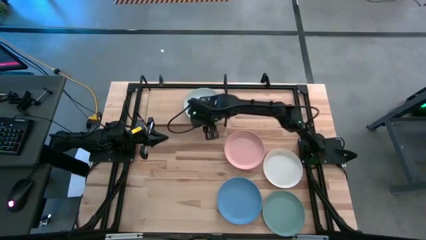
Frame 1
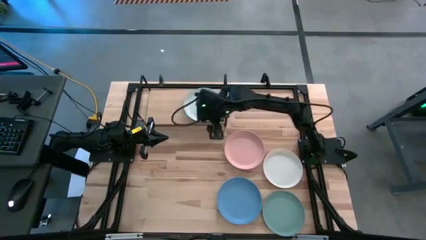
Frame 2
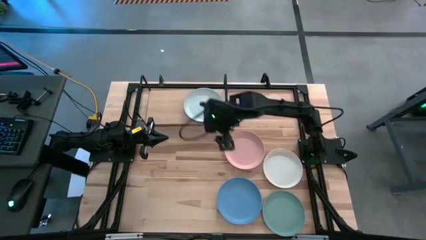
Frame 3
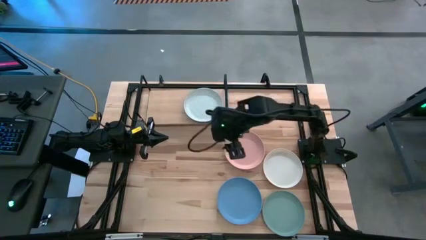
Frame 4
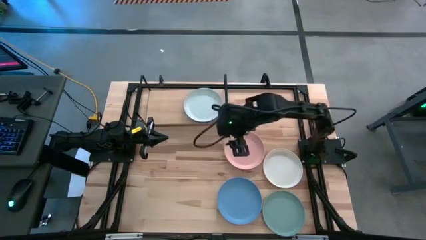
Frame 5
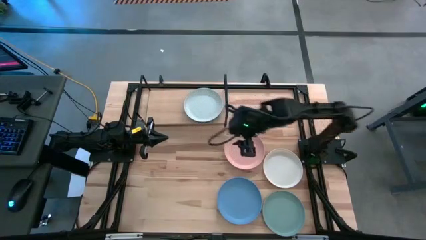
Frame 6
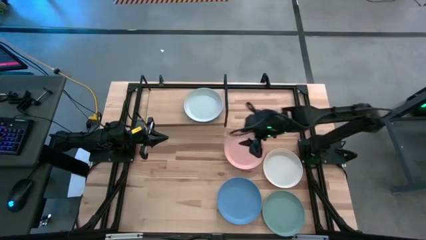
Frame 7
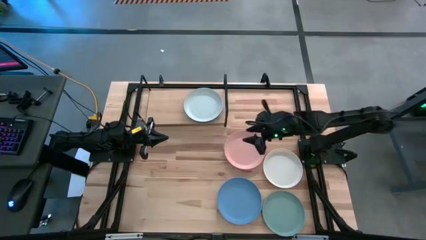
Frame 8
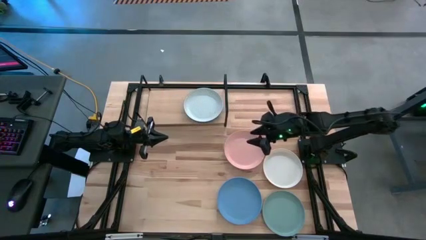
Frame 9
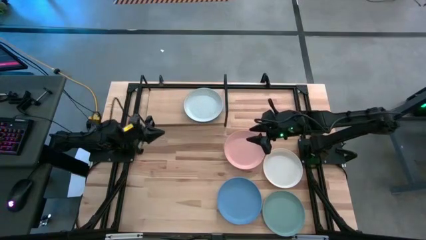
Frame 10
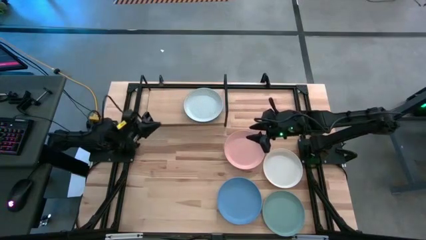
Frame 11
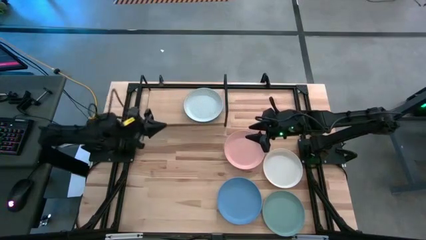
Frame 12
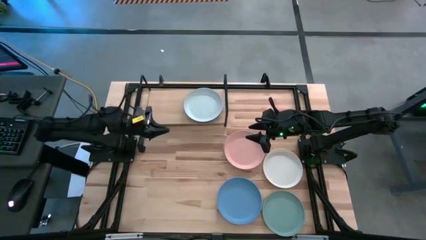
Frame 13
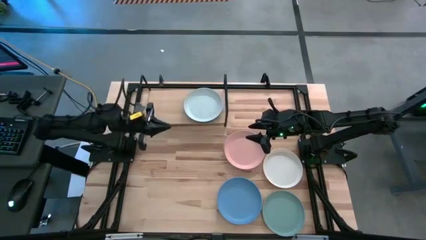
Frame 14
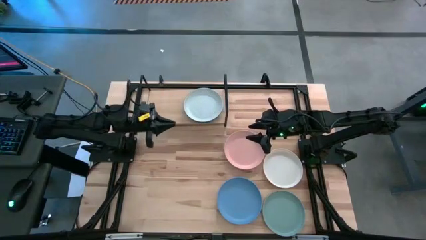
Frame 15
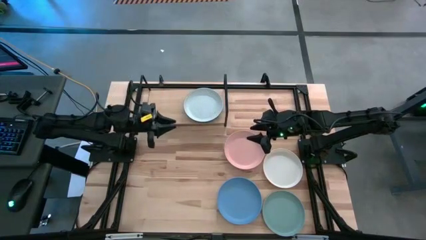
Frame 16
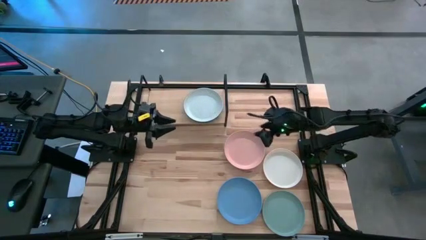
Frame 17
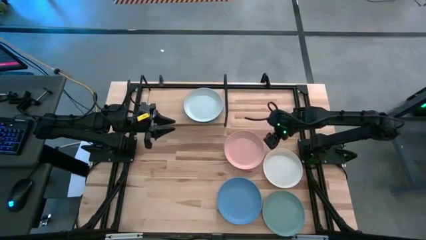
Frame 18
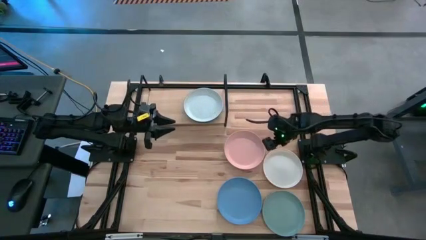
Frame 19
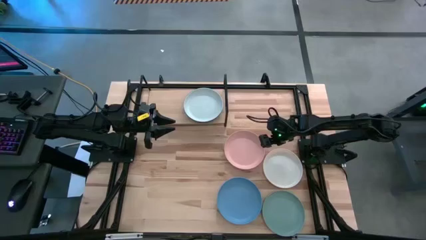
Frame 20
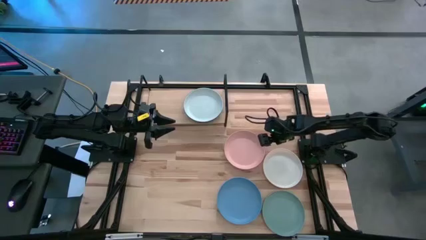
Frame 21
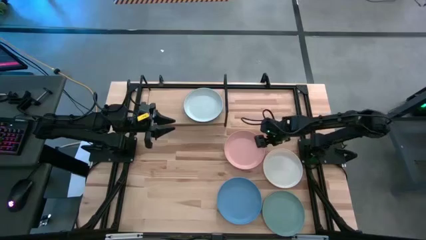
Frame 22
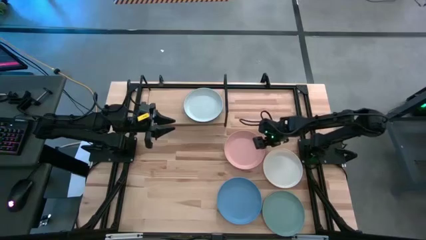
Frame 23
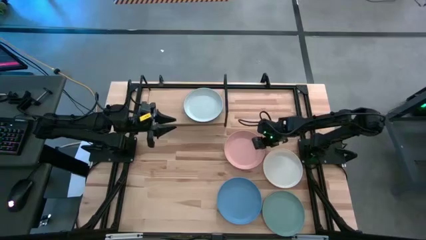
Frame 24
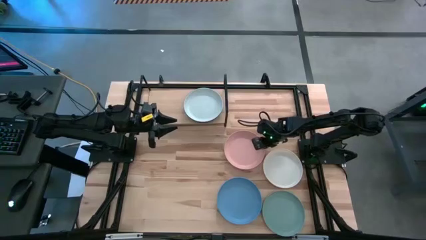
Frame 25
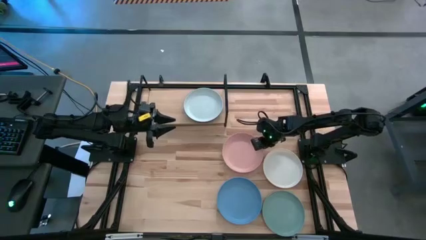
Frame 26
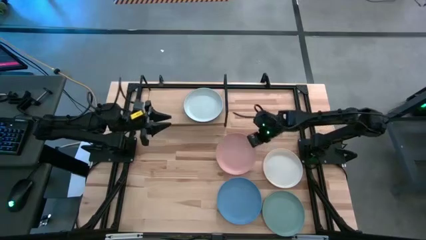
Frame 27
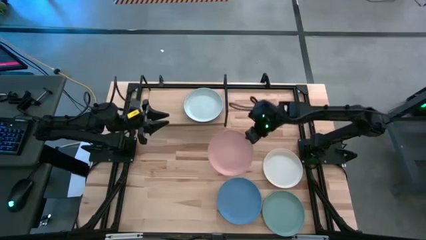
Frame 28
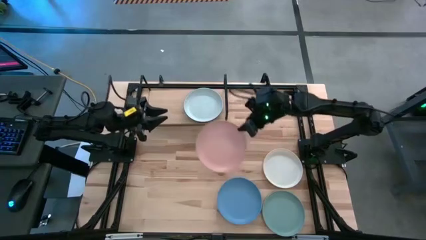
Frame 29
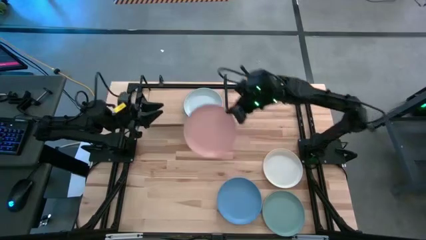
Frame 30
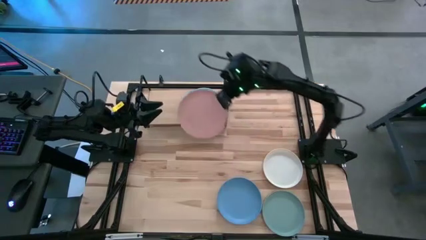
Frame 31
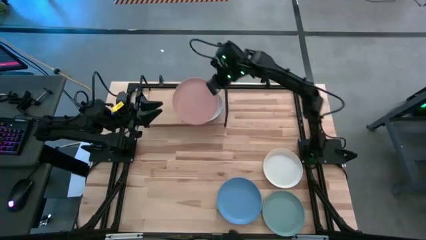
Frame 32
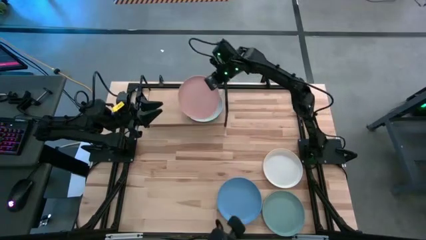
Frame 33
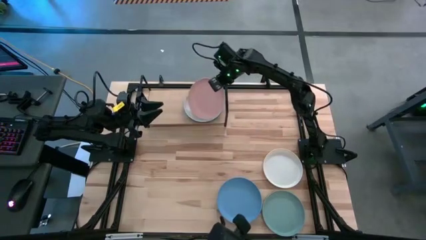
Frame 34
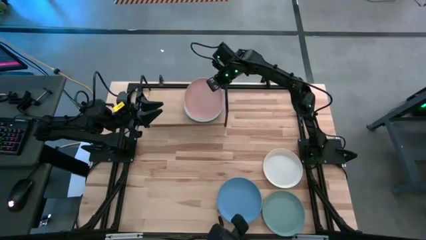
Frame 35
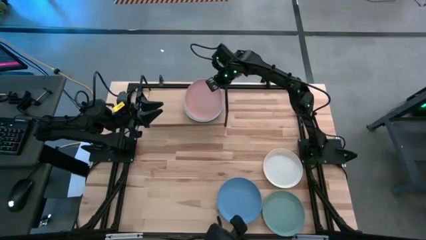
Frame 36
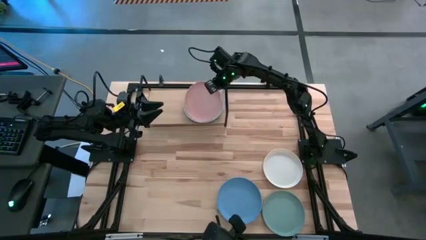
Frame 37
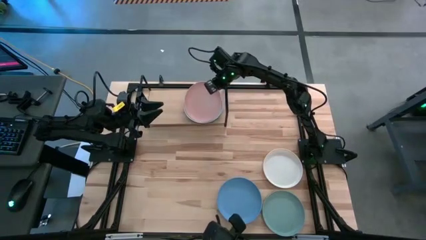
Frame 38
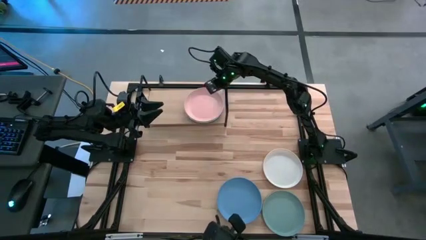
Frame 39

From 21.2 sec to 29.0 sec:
Task: Place and stack plates onto a shelf
Stack the pink plate on the top of white plate

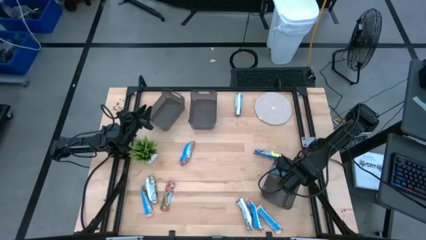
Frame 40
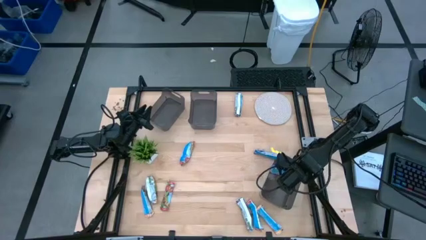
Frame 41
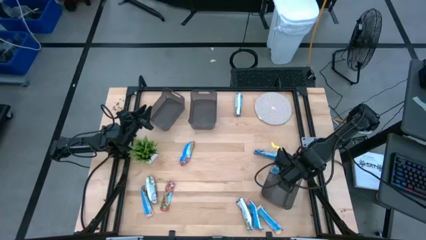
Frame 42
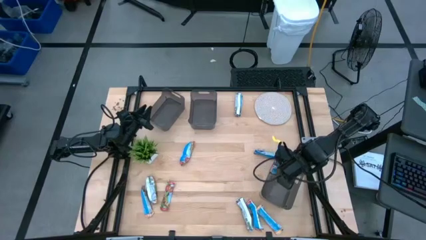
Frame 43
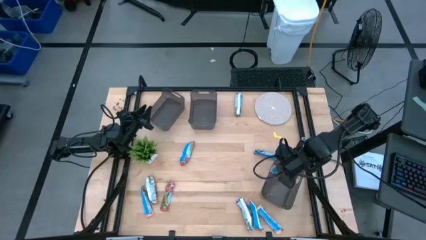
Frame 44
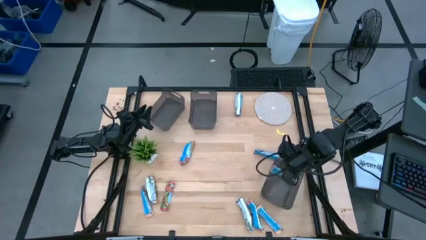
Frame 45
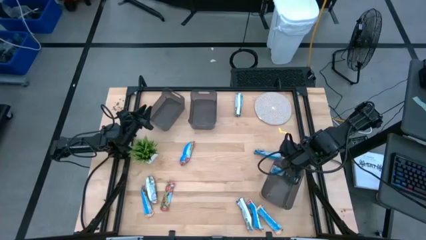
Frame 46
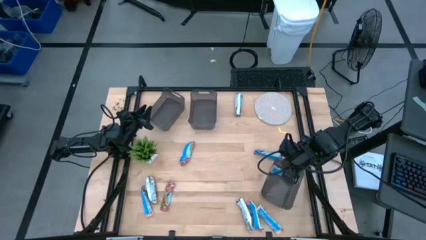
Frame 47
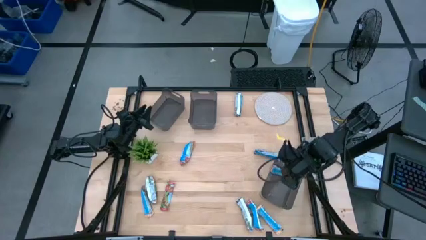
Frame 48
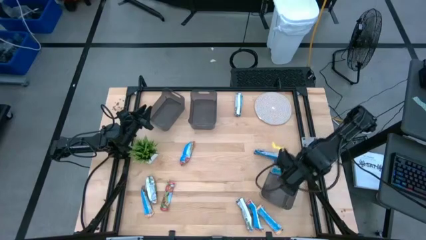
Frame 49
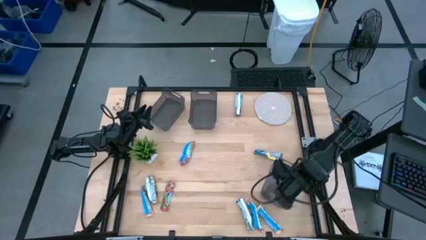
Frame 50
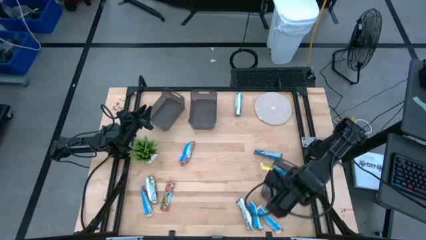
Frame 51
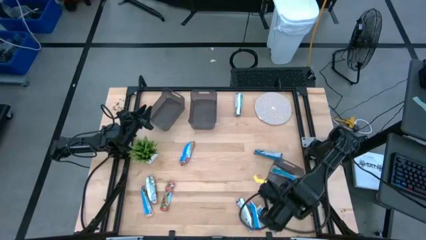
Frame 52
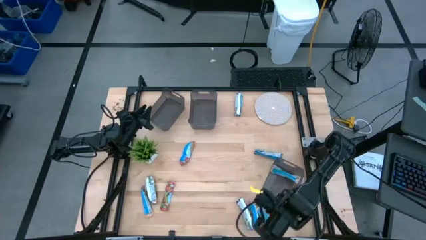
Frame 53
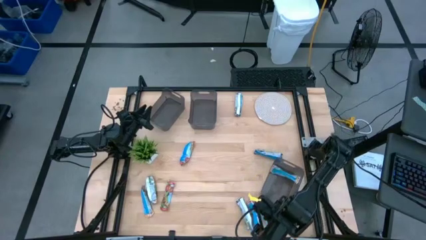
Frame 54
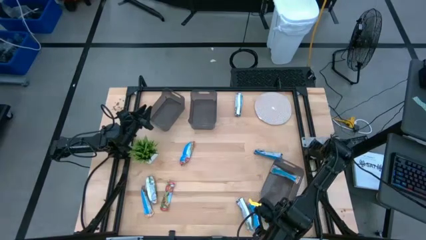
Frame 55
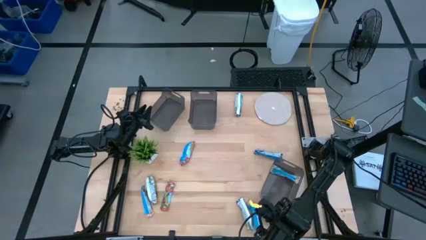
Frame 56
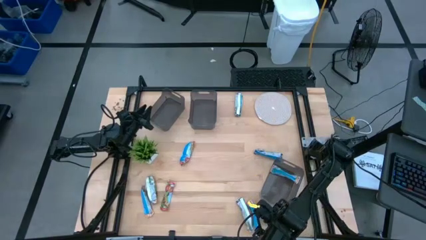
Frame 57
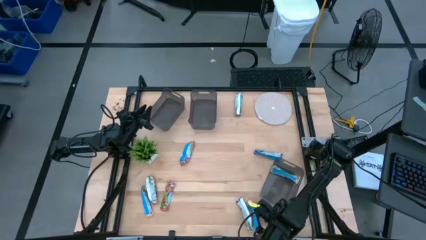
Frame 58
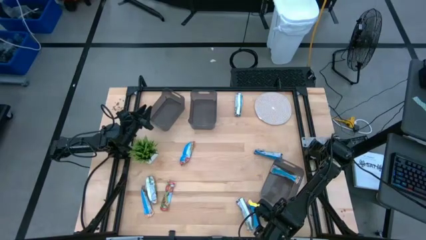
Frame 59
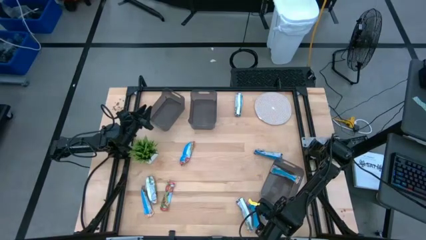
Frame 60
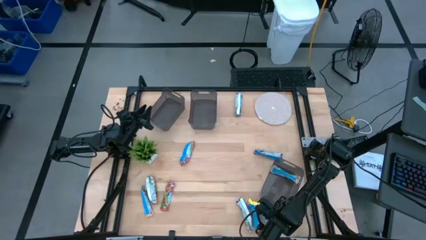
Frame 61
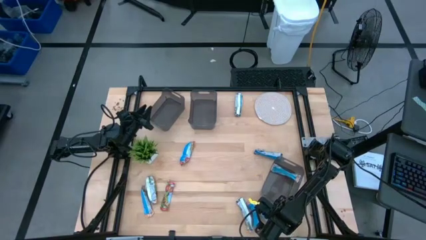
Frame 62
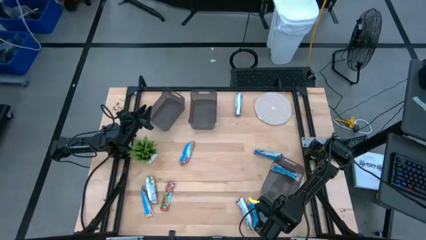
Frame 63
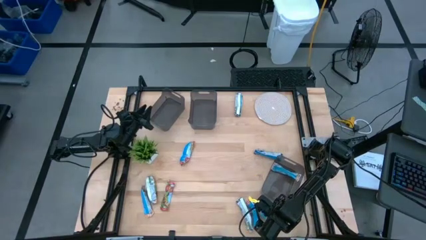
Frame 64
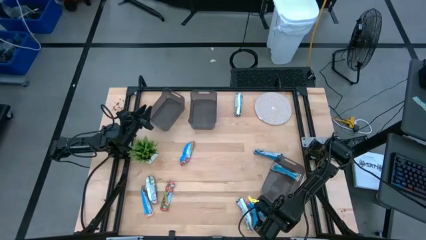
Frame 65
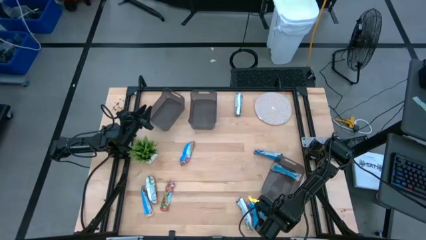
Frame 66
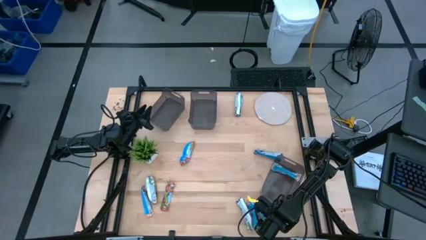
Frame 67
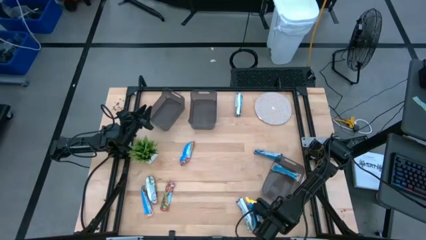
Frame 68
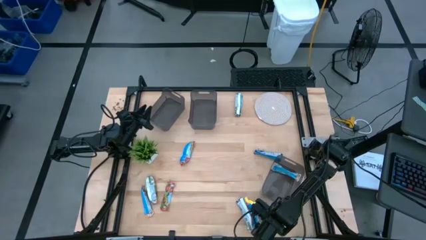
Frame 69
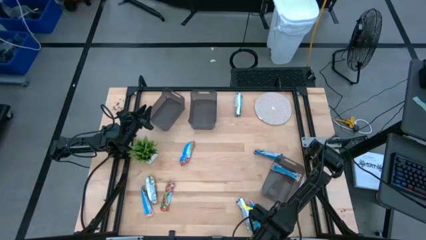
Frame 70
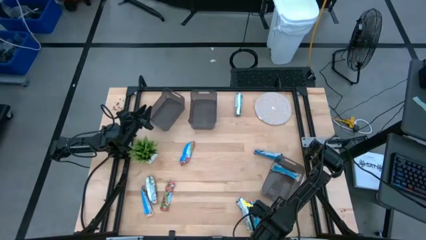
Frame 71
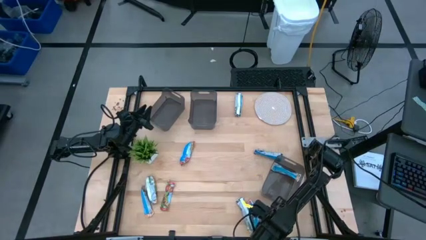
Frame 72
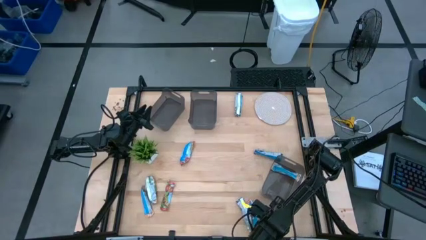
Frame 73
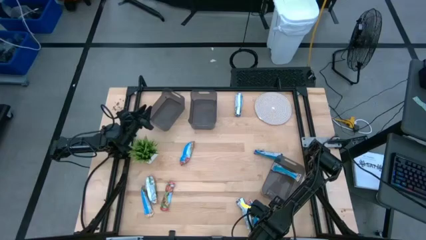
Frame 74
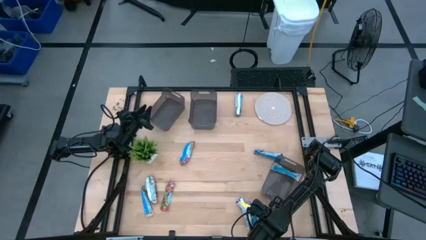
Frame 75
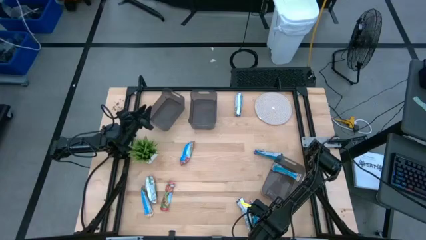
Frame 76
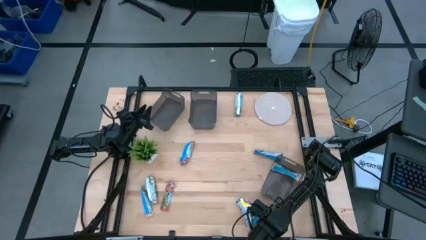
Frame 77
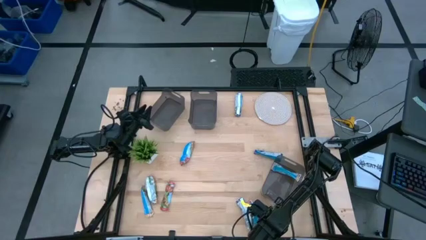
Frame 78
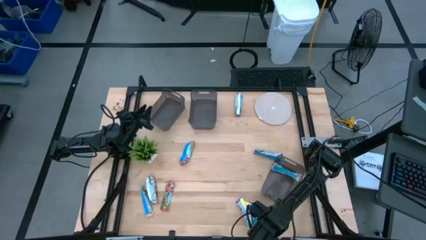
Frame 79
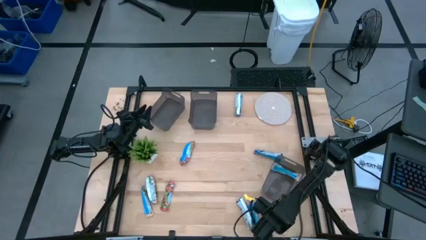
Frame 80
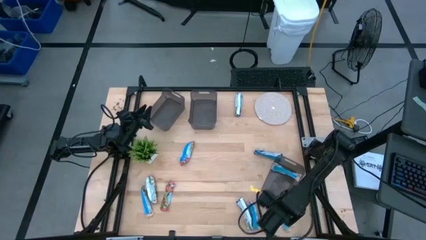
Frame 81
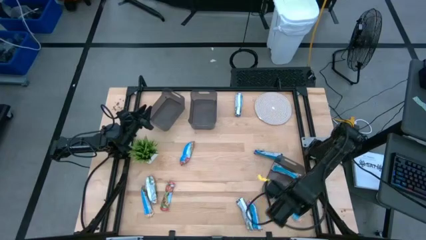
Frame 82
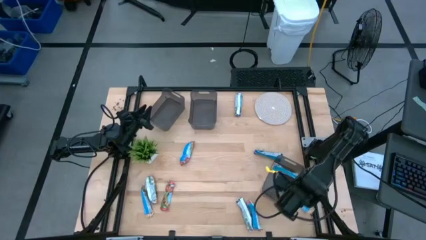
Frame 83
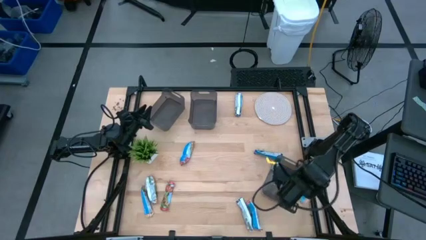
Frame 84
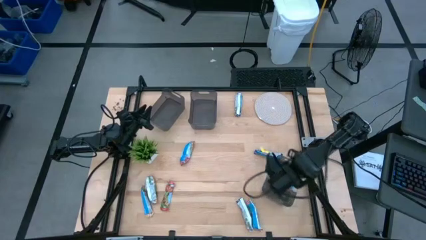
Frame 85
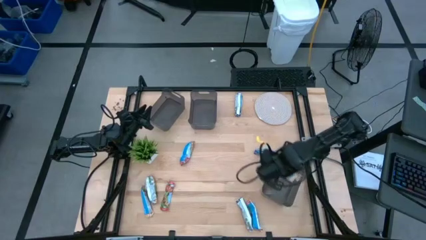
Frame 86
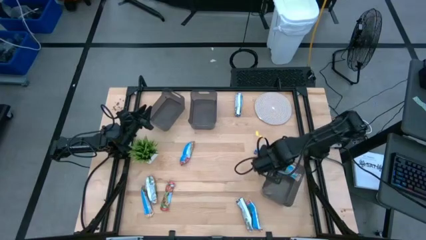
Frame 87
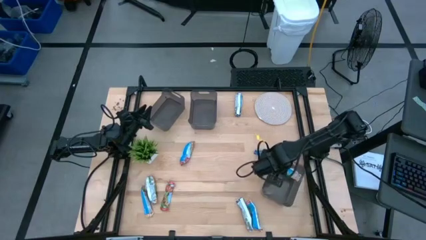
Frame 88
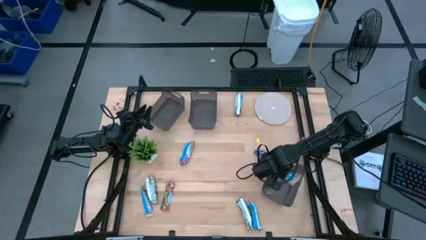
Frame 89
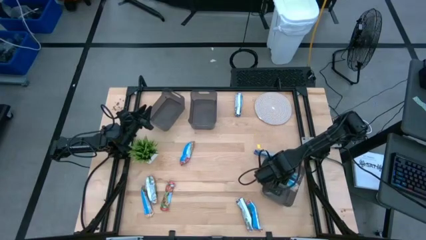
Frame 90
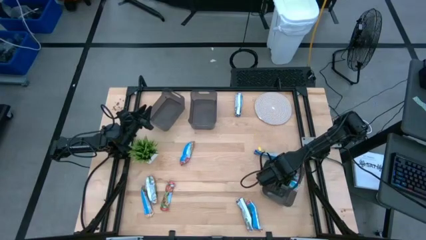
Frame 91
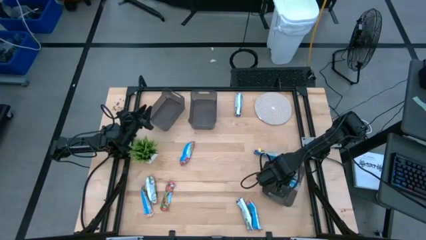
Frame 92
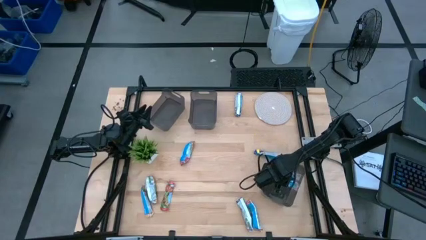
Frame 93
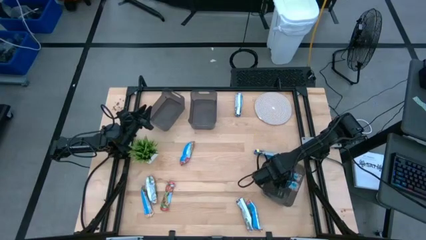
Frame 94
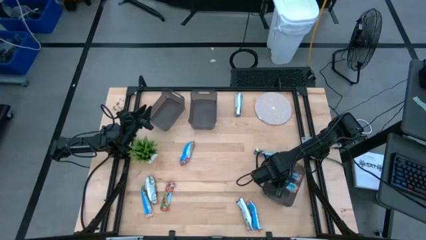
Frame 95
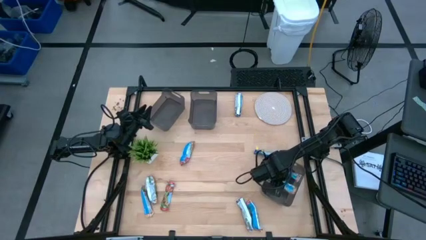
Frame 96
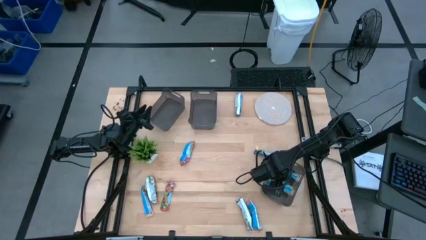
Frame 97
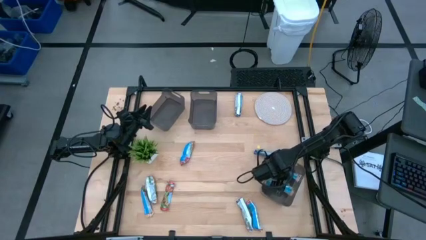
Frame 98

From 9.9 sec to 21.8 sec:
Task: Pick and place Granola Bars by type
Put the yellow granola bar into the bottom black transparent bin
